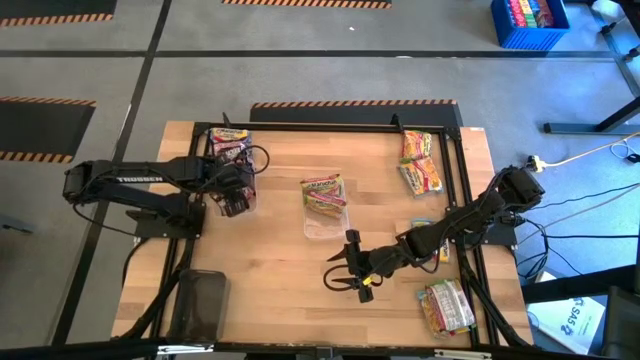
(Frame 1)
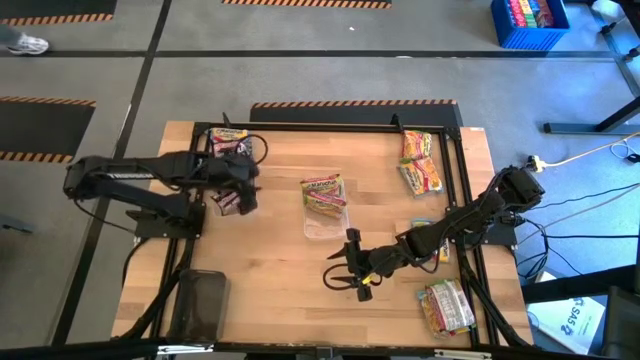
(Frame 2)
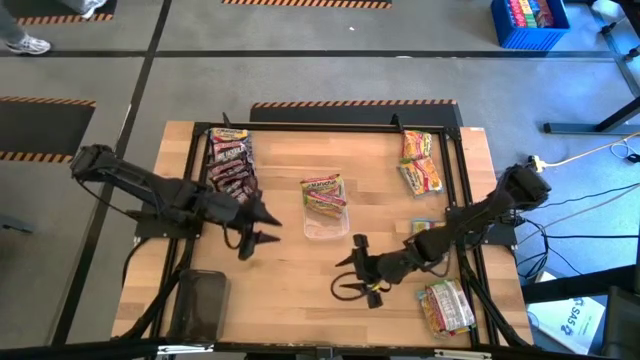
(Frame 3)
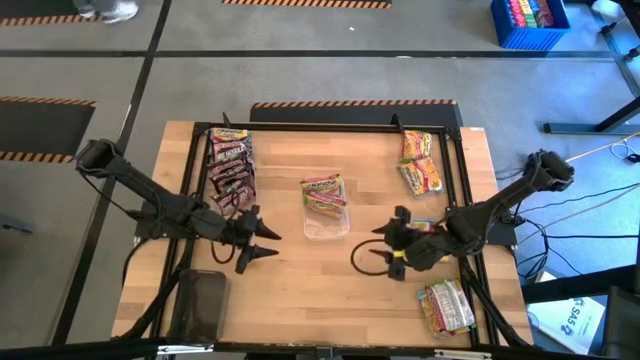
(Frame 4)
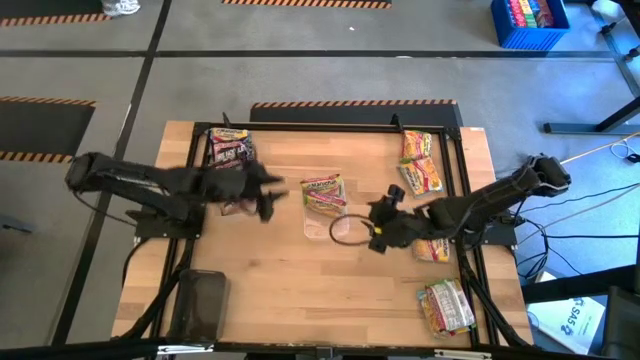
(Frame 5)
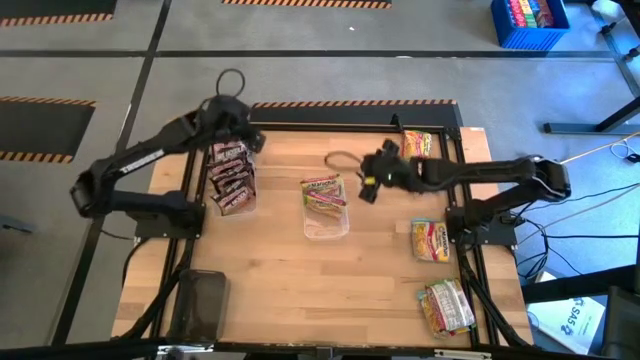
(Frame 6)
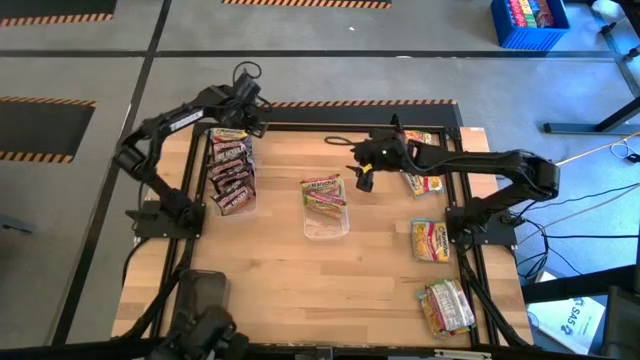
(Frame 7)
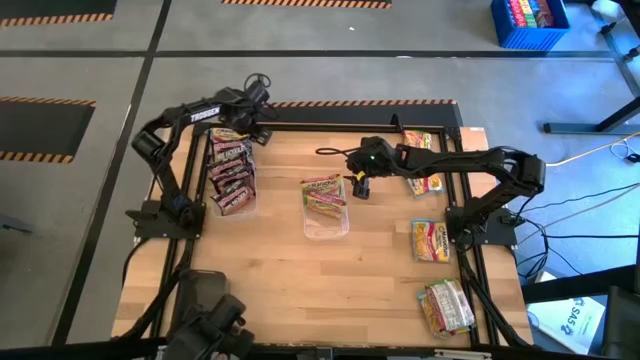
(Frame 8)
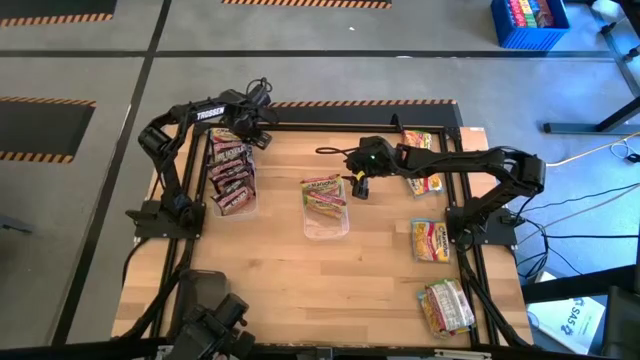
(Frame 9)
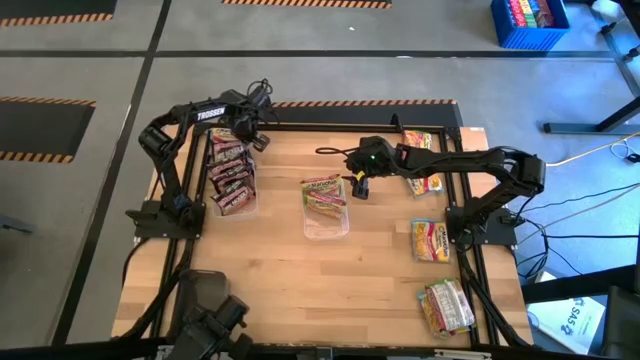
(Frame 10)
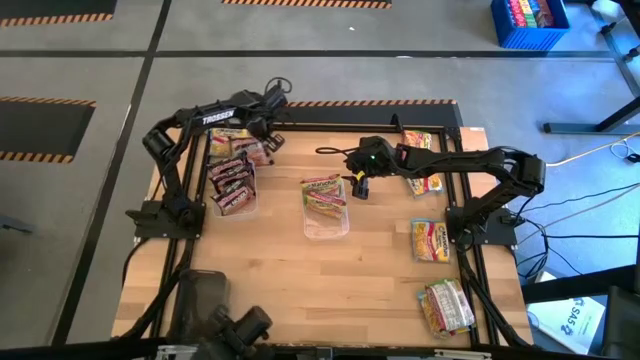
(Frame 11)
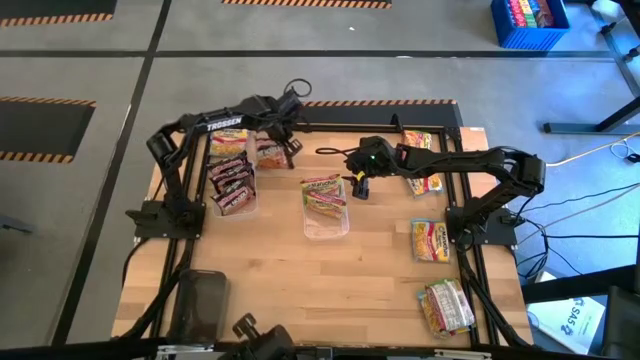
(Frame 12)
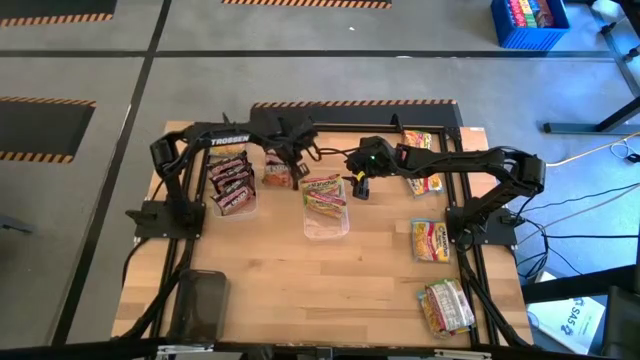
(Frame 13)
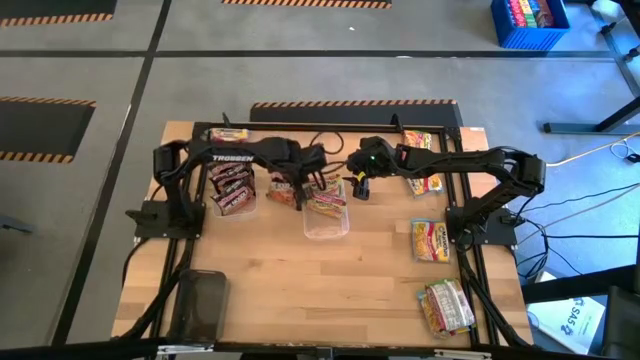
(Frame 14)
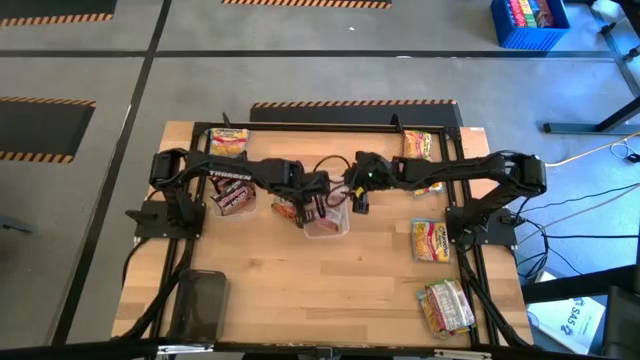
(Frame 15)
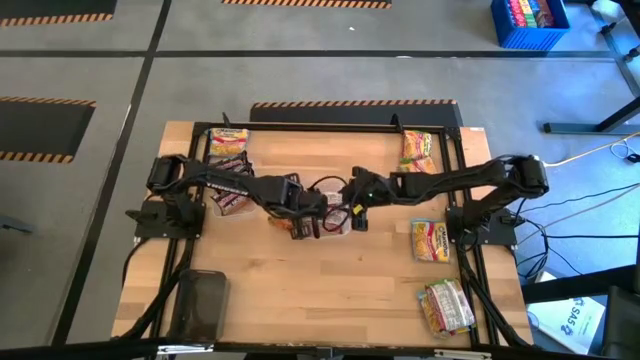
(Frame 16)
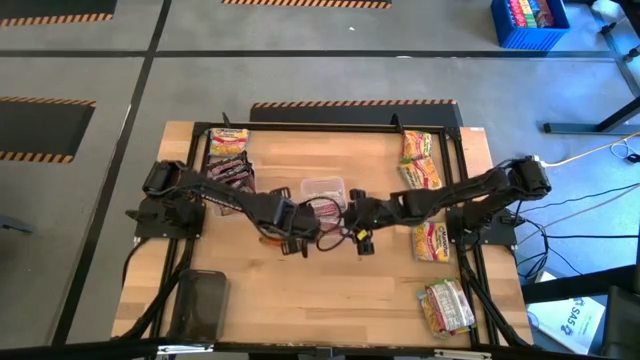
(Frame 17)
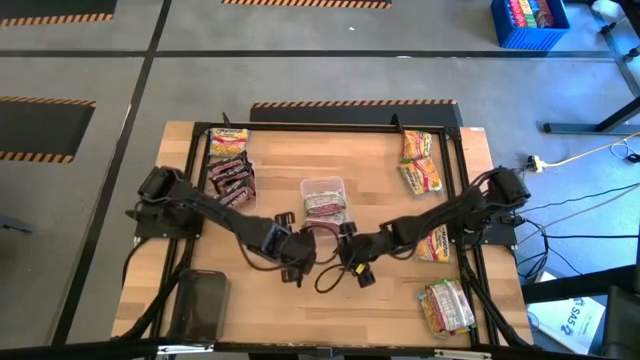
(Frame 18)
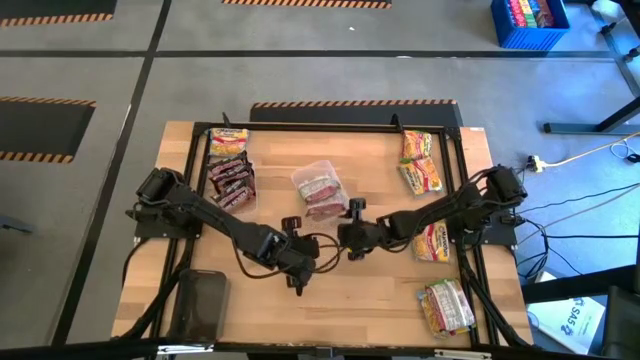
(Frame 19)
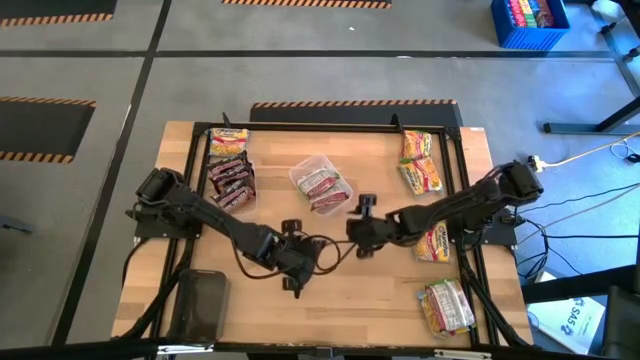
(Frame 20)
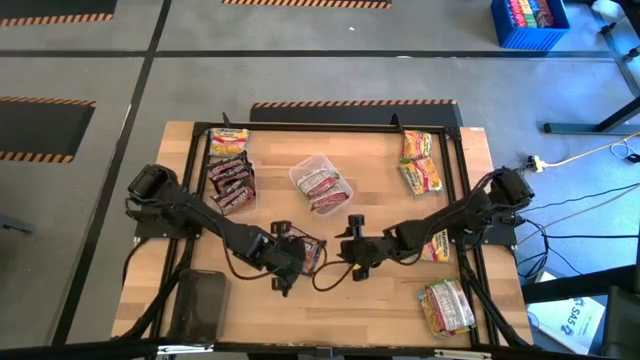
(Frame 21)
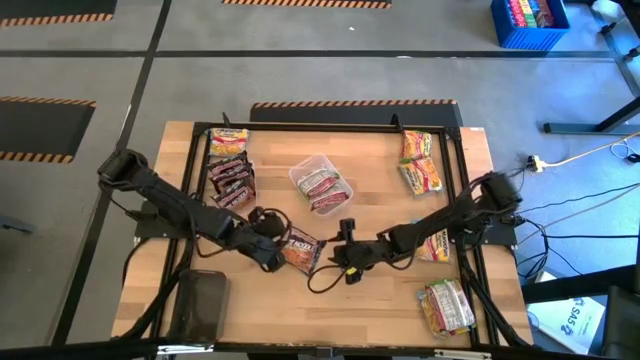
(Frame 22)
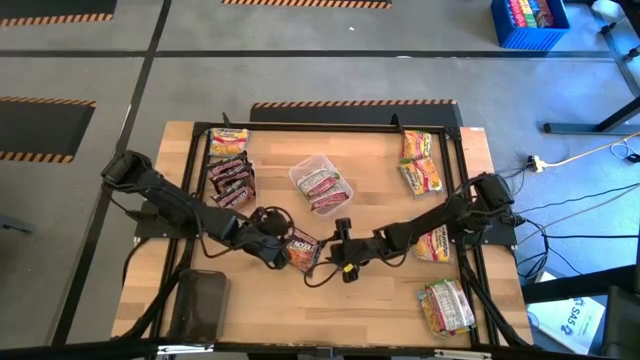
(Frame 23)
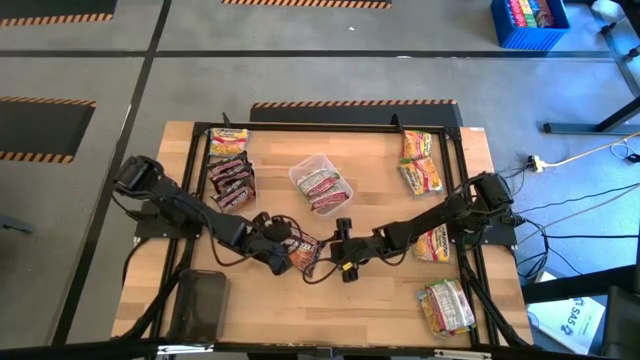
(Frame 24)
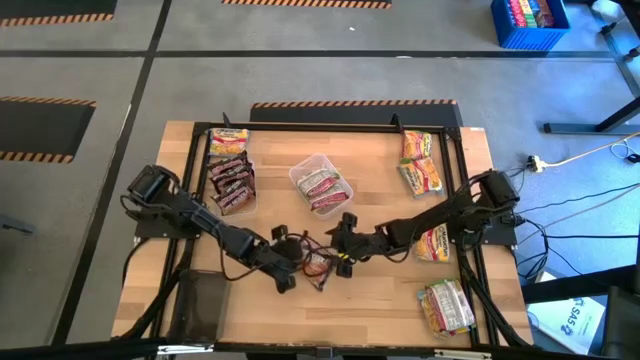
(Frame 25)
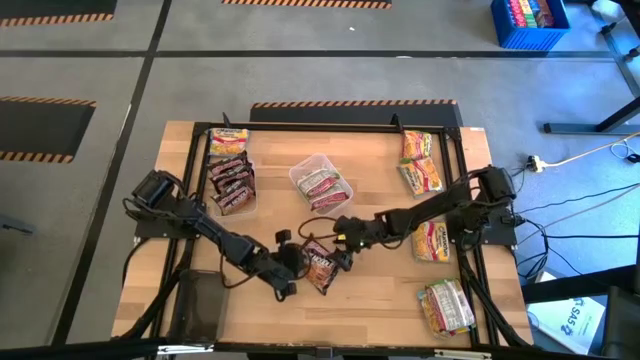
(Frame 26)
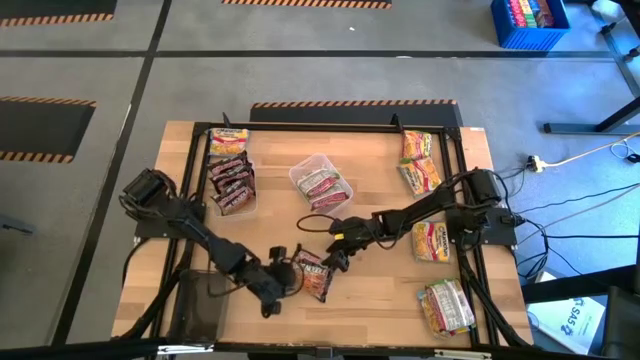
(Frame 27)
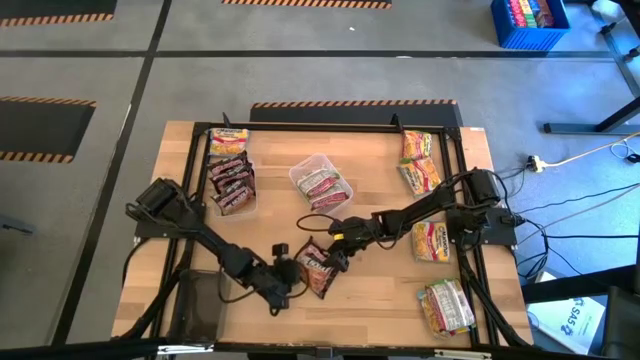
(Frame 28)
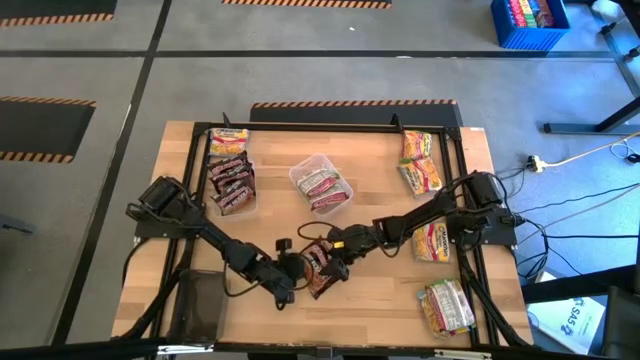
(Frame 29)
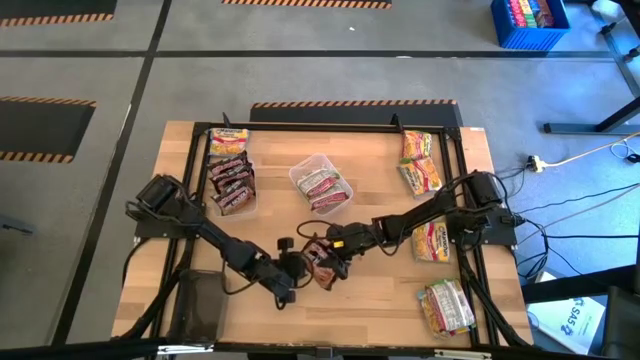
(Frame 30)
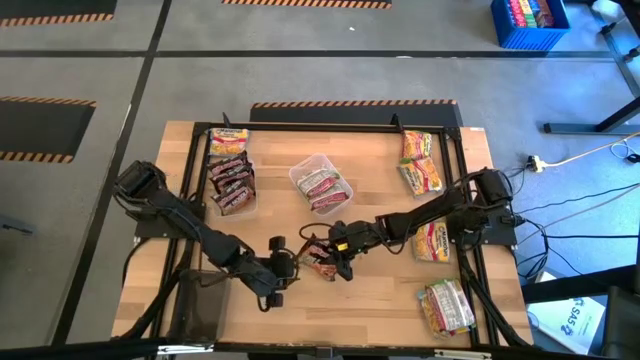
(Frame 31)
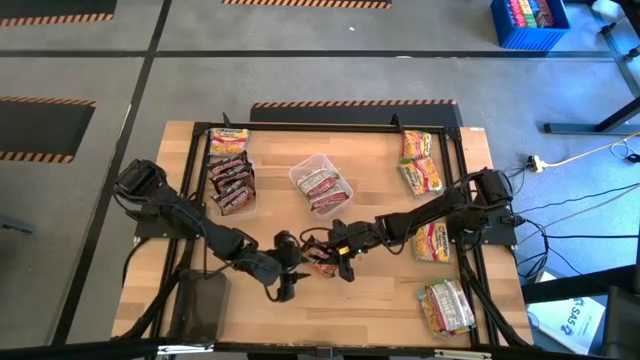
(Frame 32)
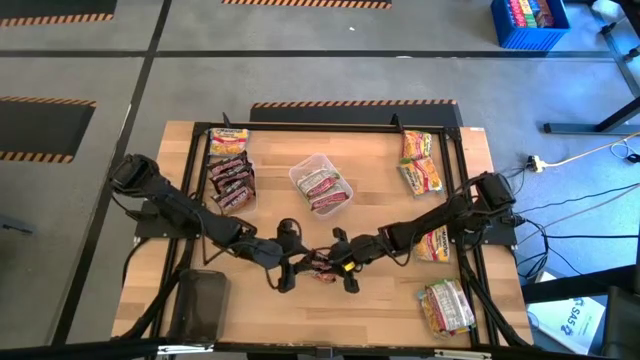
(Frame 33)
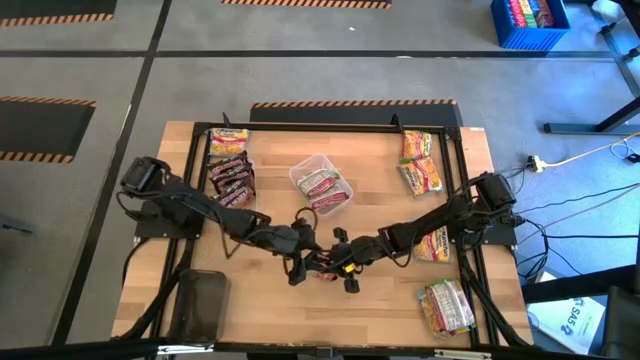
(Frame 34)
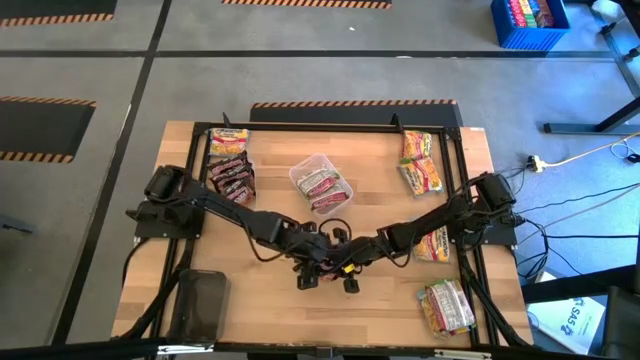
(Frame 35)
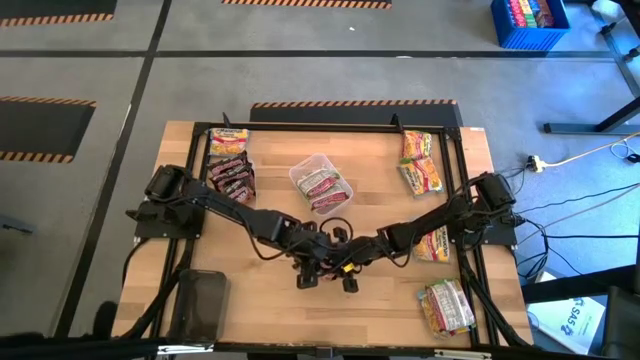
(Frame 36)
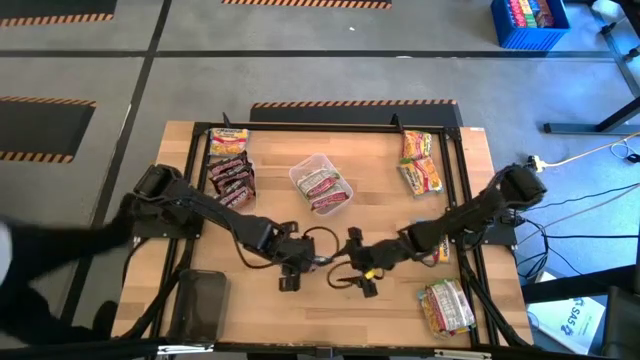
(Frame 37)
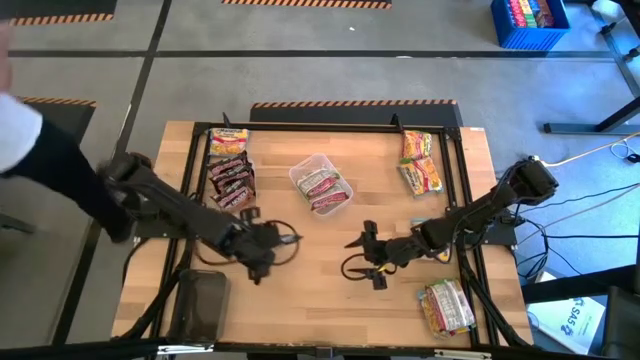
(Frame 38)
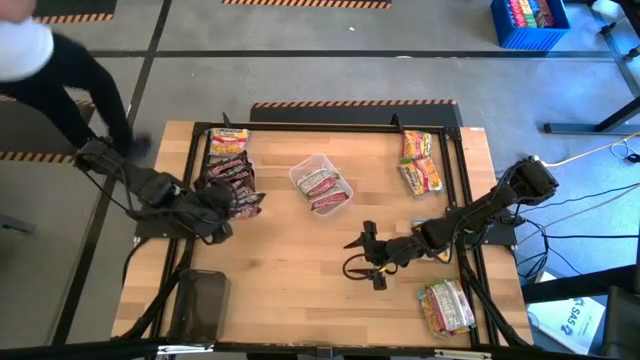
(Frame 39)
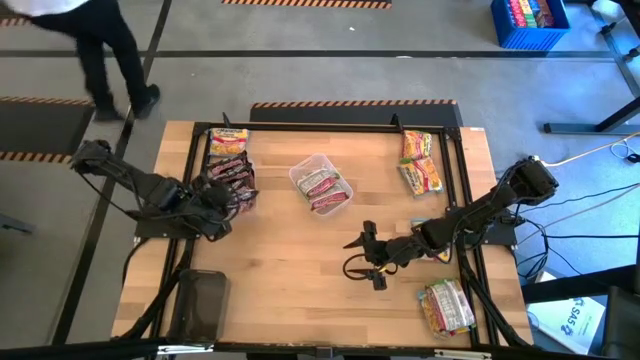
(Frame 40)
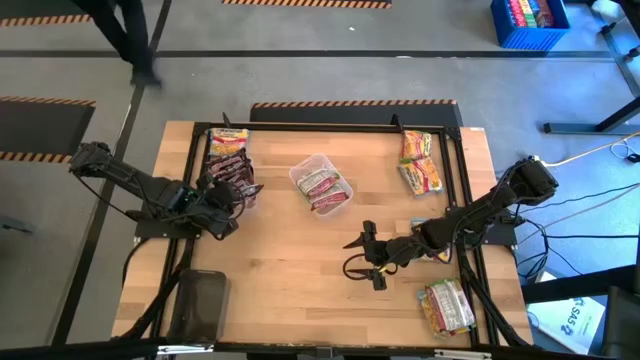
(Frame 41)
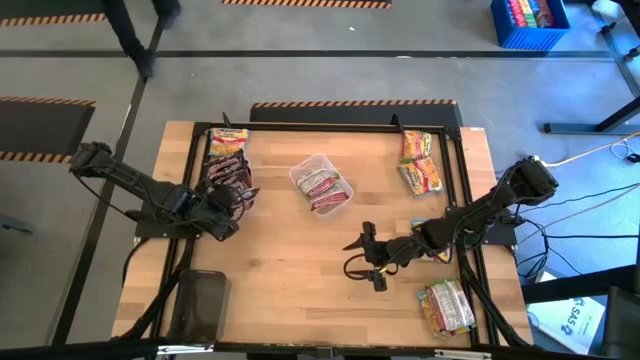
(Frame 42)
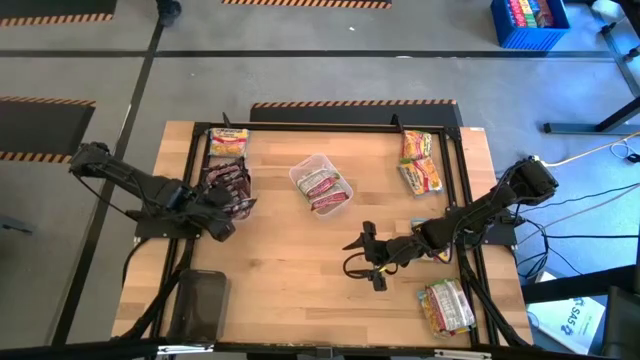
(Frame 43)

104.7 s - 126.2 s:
Task: Sort Maruchan noodles
Put the black noodle pack into the left transparent bin
